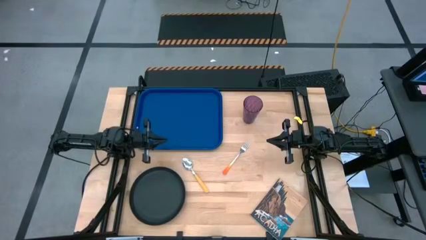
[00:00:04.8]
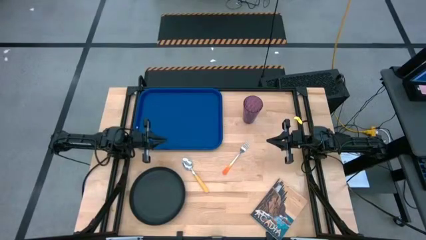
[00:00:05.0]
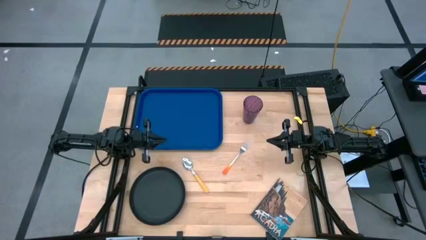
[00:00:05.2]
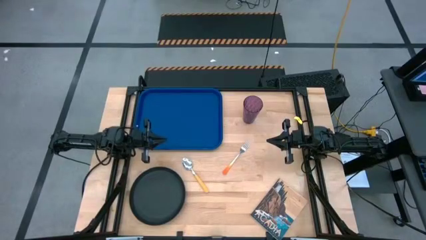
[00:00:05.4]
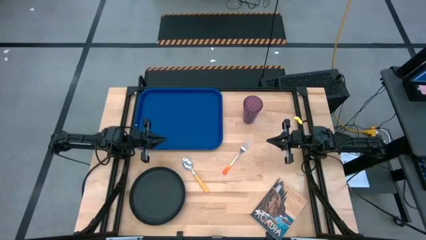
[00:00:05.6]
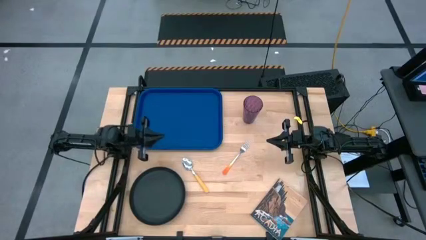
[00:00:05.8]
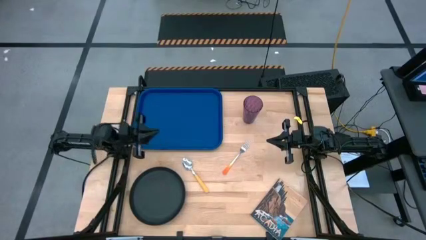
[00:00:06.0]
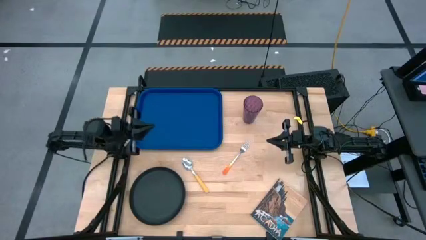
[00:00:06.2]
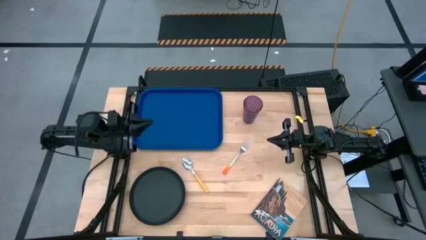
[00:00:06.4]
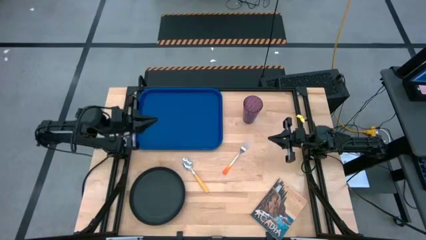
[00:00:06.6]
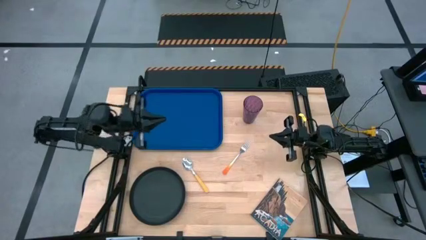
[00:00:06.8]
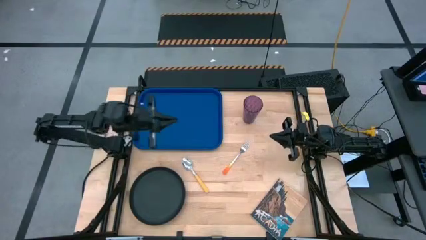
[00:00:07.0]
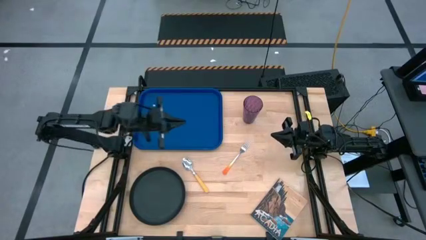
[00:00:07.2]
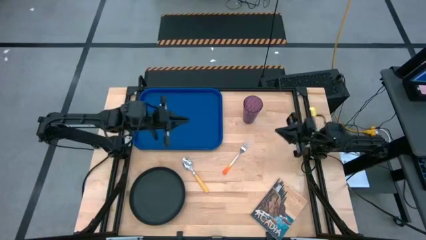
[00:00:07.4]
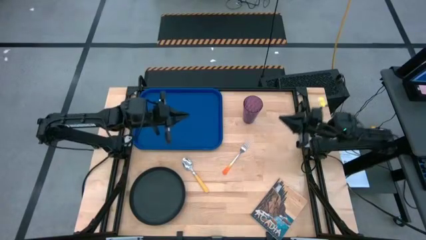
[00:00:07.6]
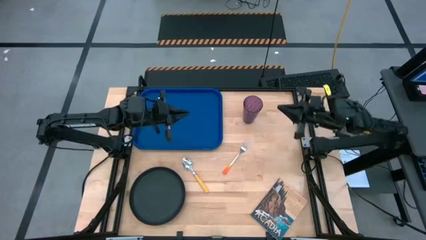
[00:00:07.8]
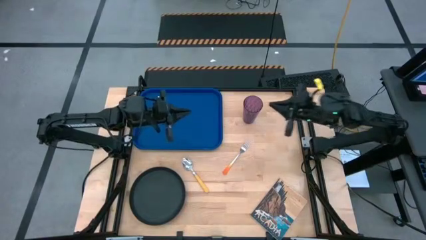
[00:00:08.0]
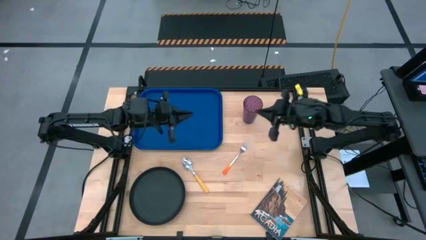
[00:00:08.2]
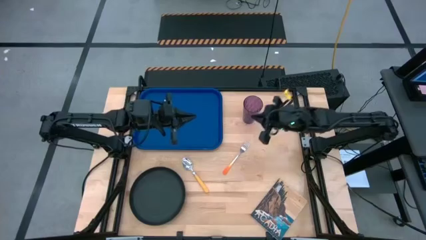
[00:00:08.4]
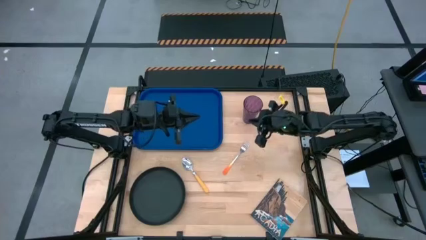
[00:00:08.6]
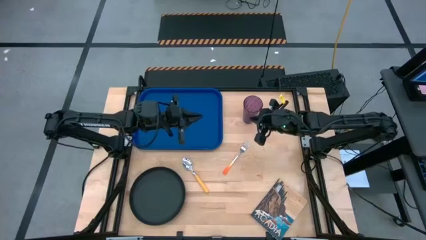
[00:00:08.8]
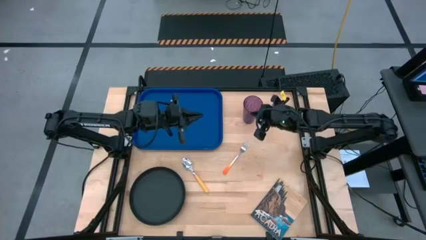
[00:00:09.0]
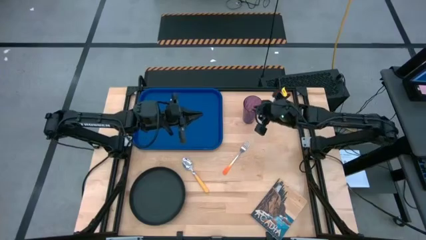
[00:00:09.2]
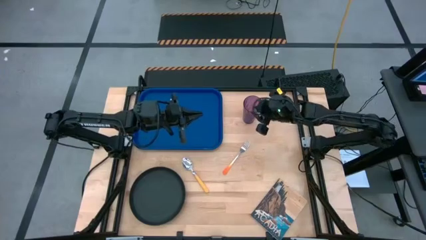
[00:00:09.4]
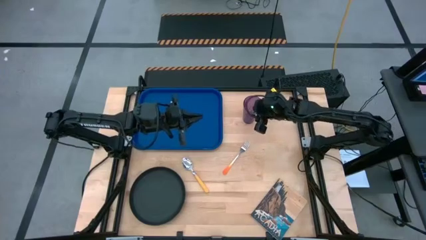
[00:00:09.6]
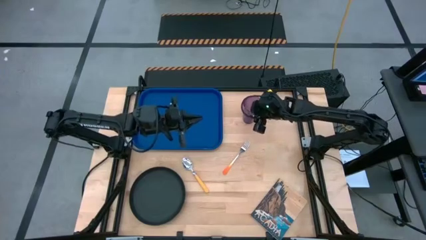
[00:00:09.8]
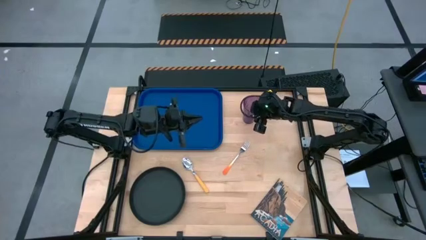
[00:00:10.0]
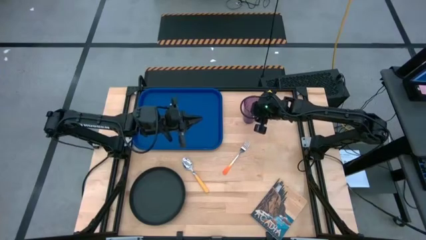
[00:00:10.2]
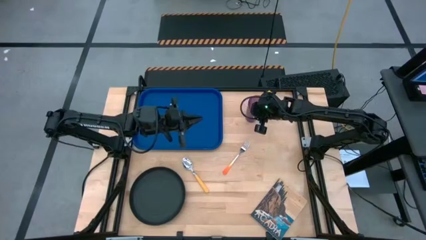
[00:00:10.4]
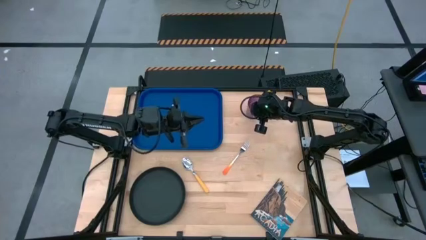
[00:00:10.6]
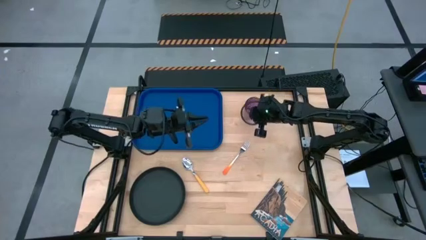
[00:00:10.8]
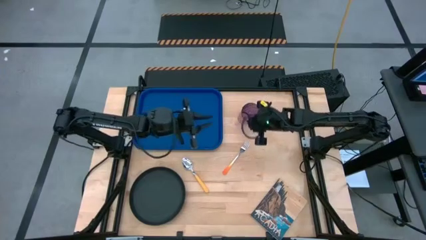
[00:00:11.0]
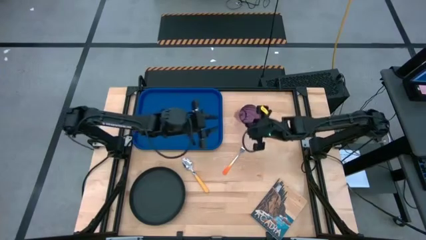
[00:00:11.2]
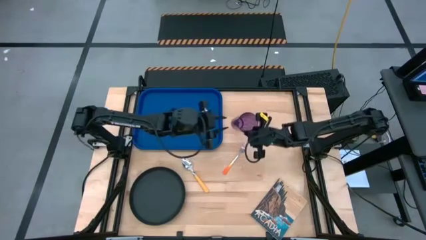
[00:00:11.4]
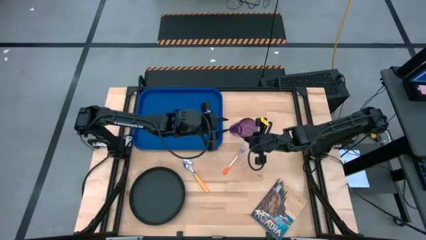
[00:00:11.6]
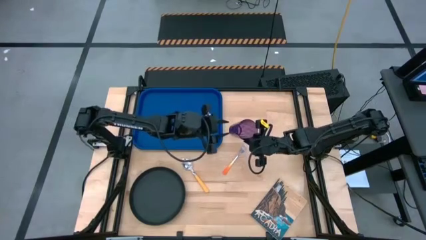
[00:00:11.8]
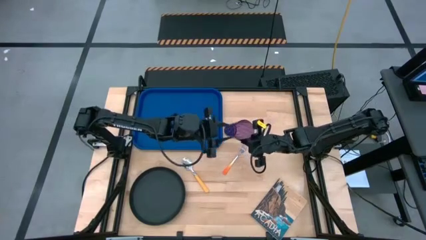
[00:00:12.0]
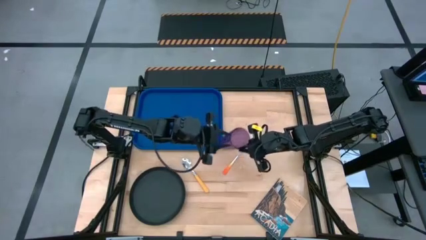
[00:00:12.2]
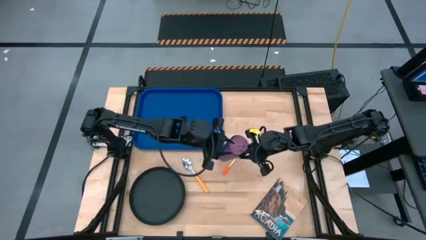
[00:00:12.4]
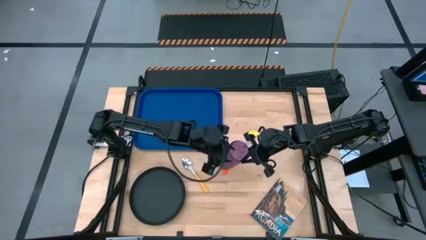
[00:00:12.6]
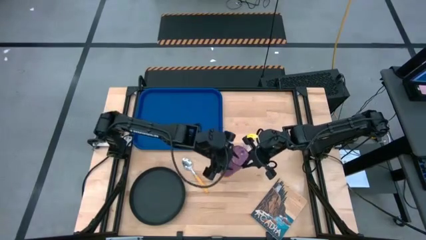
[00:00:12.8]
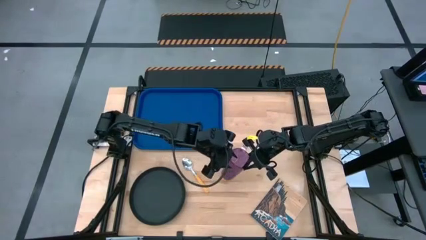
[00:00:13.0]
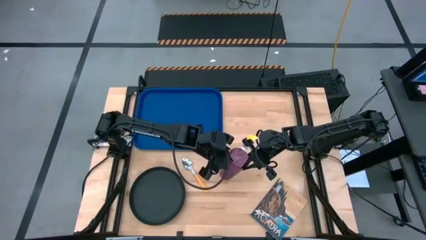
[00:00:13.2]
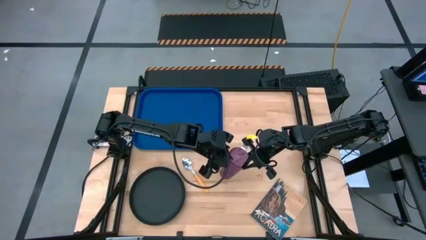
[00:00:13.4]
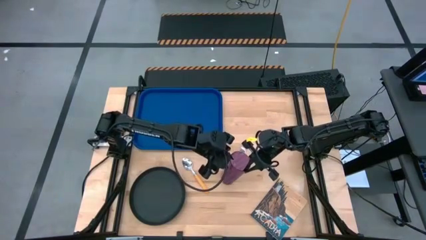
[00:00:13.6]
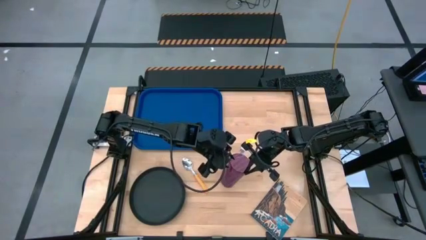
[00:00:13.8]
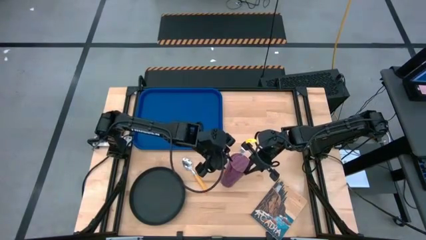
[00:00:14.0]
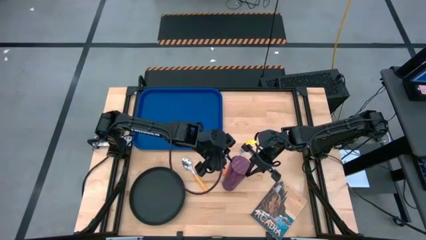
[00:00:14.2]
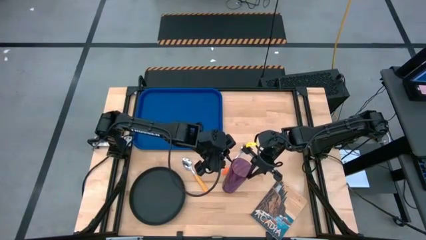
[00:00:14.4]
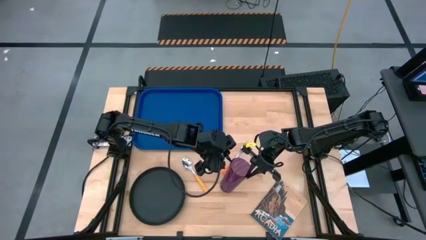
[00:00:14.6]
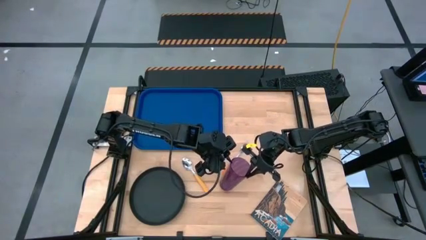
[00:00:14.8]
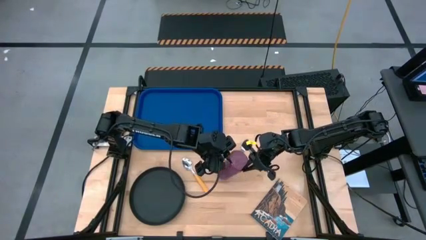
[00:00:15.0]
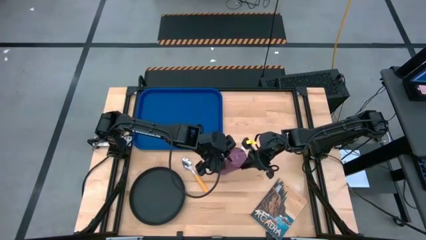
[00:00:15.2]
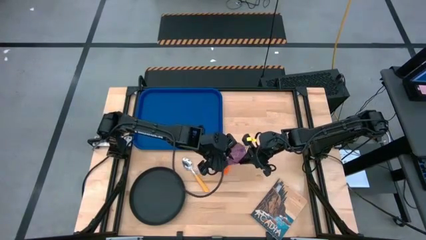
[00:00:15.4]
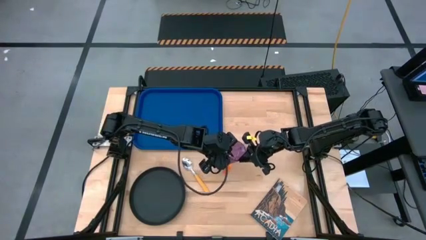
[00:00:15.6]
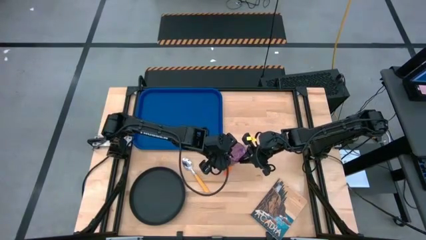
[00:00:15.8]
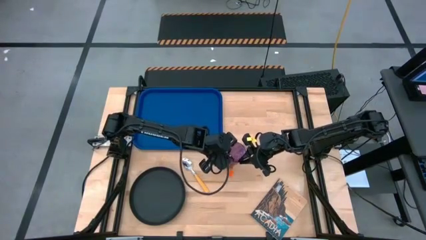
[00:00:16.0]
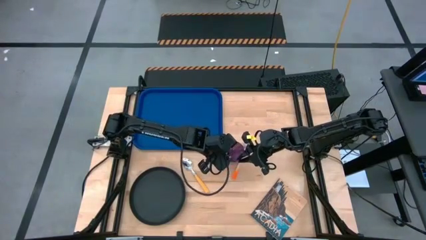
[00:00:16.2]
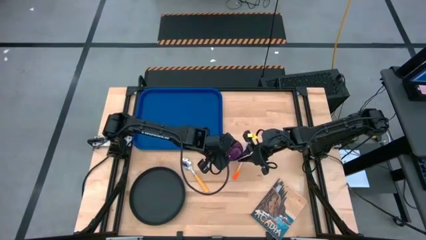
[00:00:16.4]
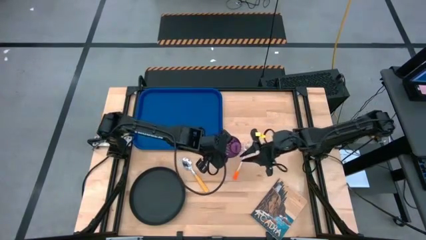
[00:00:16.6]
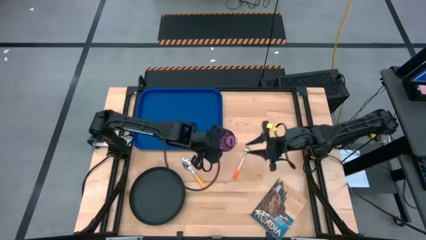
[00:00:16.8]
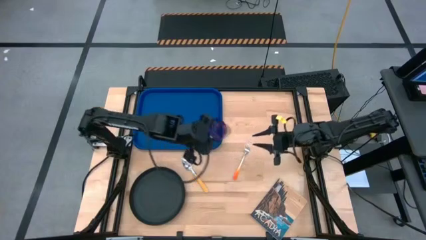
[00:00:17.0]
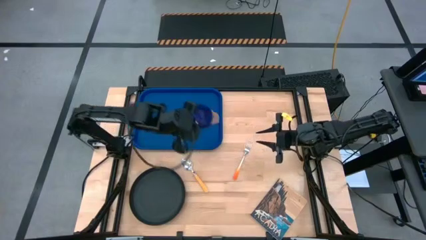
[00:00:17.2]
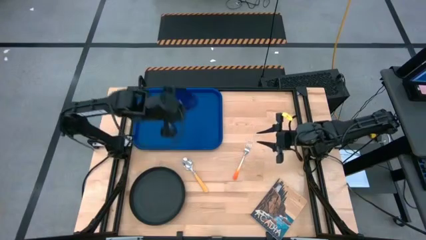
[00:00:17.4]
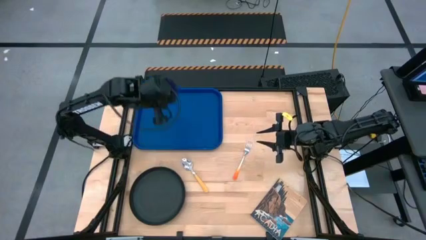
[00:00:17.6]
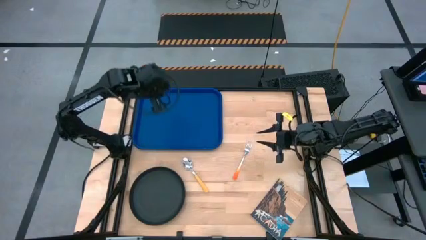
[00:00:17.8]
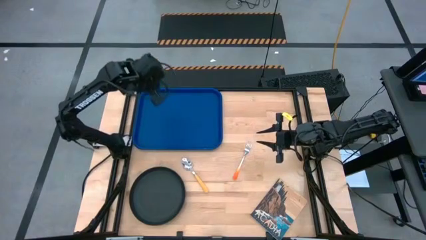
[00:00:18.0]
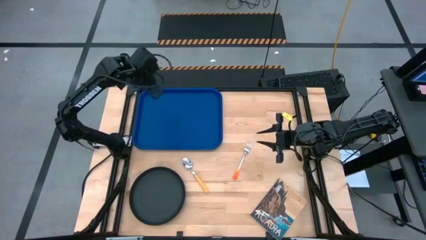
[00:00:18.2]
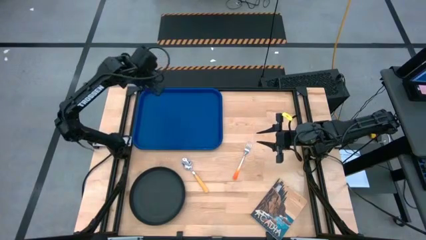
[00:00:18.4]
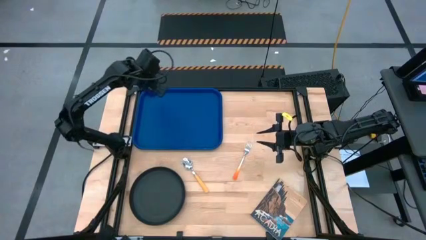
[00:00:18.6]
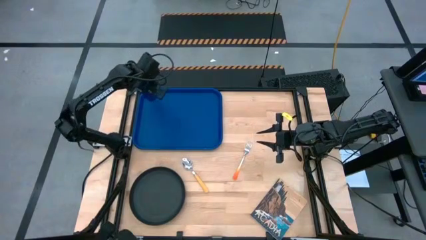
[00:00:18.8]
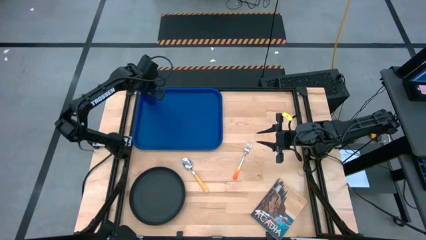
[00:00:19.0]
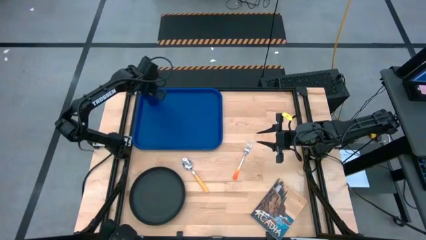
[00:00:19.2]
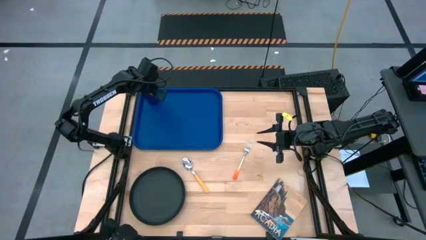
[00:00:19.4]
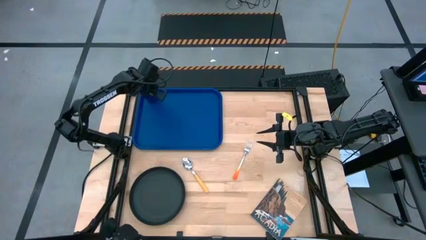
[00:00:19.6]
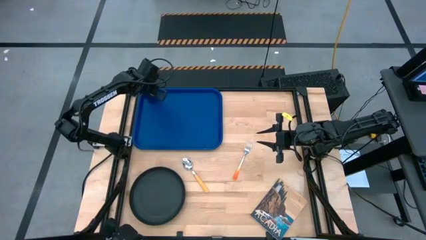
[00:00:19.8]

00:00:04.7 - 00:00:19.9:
Task: Pick and place plate/cup/fork/spoon on tray
Put the purple glass cup on the blue tray
